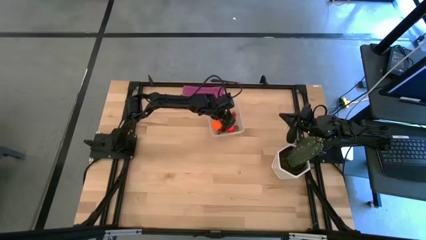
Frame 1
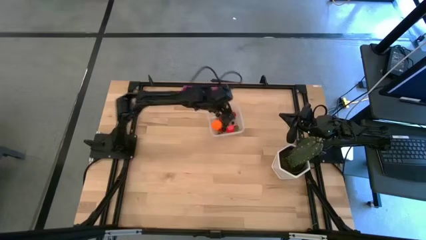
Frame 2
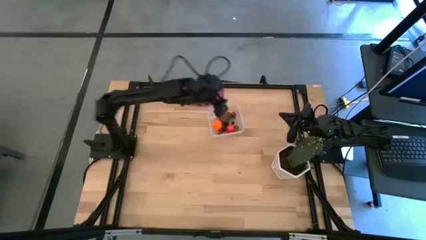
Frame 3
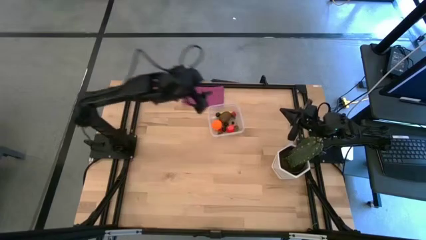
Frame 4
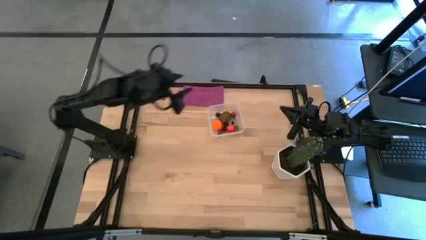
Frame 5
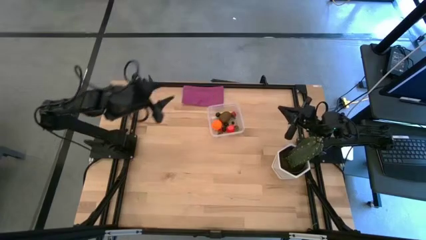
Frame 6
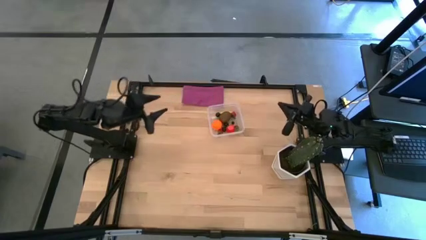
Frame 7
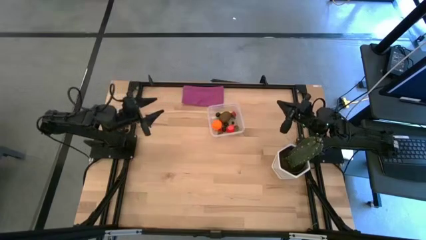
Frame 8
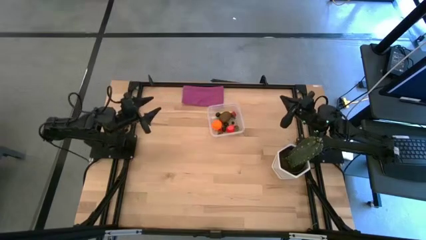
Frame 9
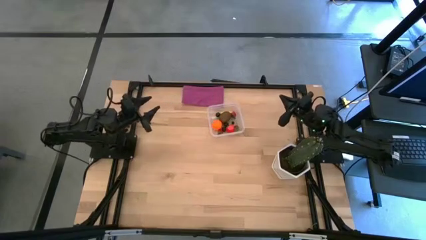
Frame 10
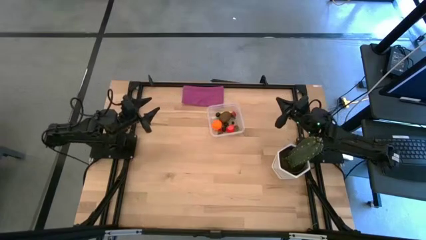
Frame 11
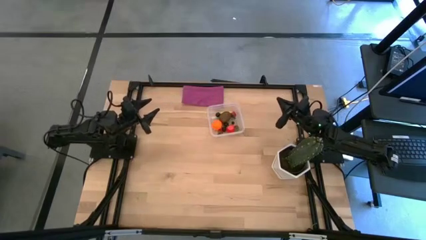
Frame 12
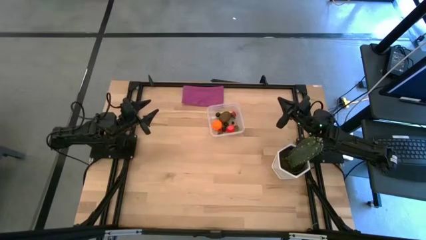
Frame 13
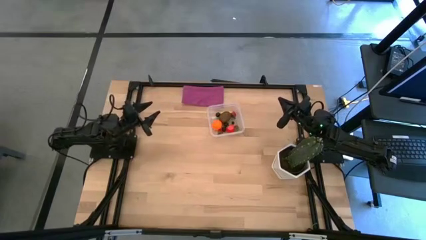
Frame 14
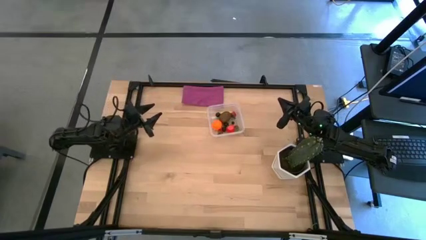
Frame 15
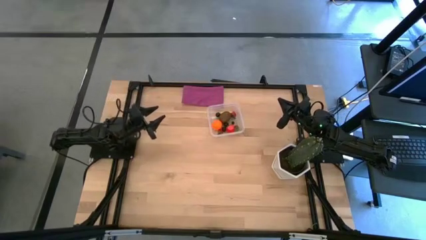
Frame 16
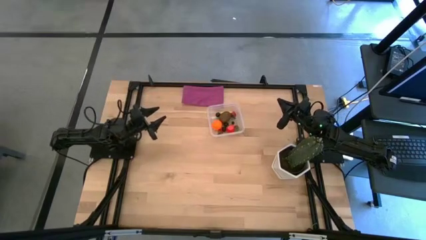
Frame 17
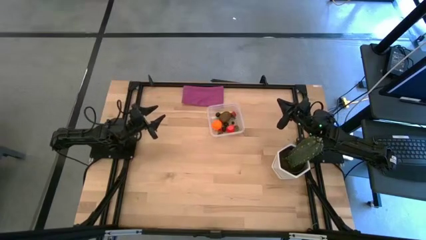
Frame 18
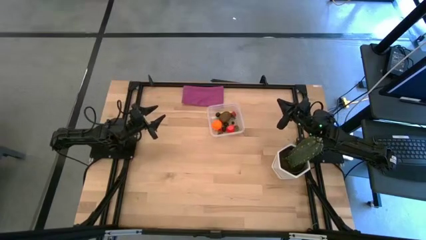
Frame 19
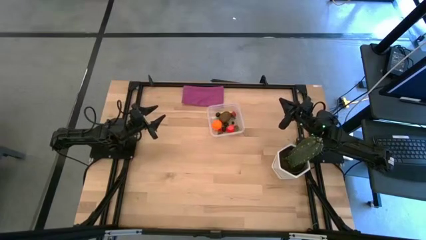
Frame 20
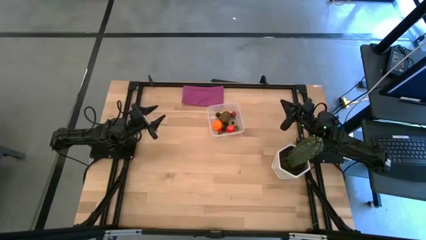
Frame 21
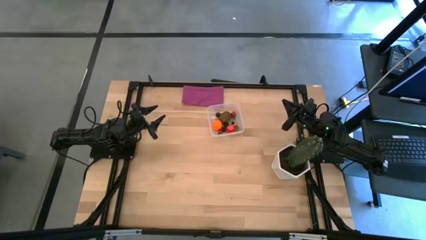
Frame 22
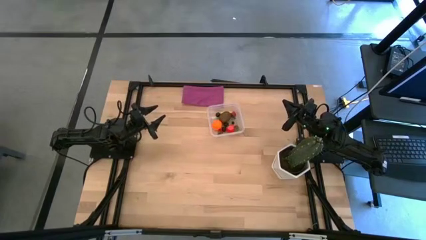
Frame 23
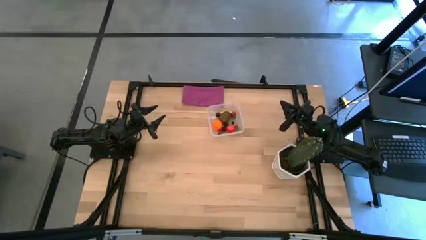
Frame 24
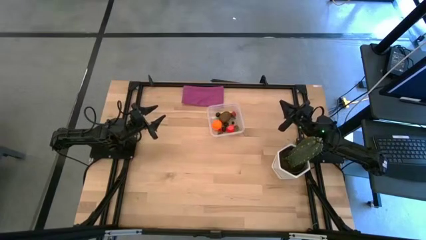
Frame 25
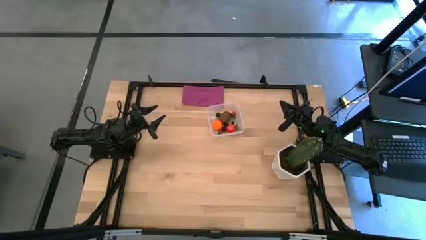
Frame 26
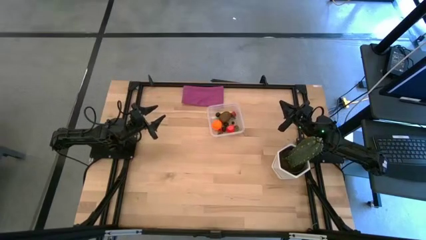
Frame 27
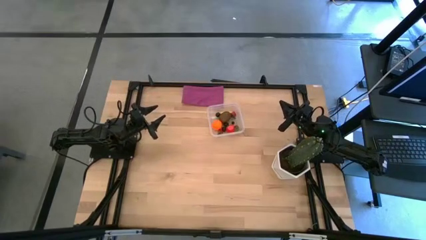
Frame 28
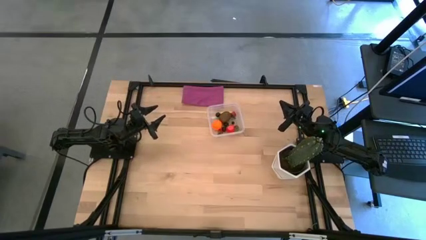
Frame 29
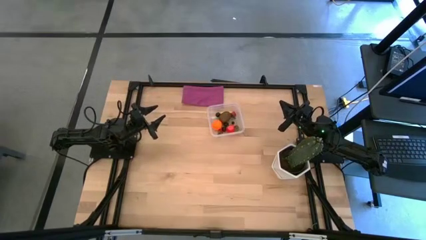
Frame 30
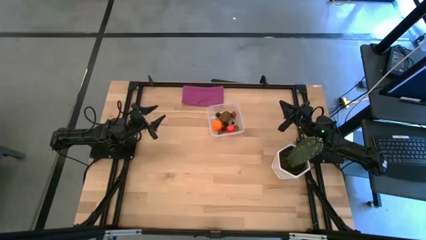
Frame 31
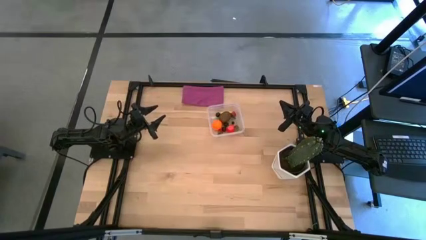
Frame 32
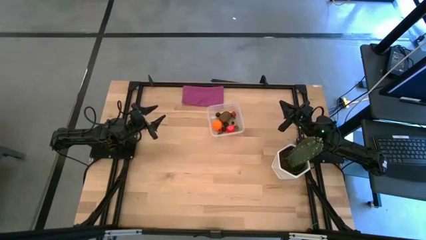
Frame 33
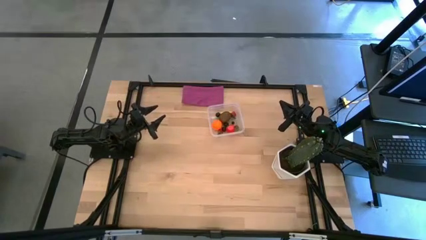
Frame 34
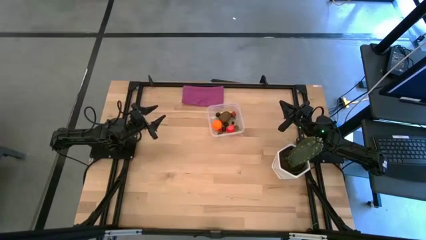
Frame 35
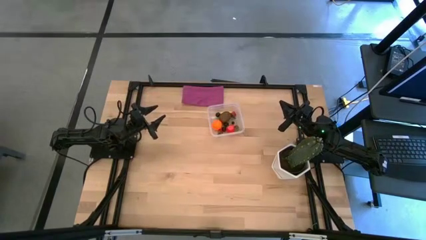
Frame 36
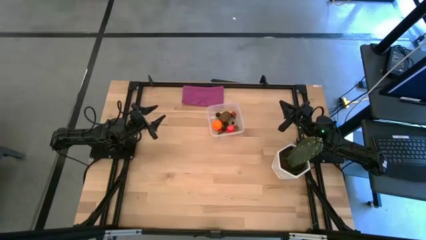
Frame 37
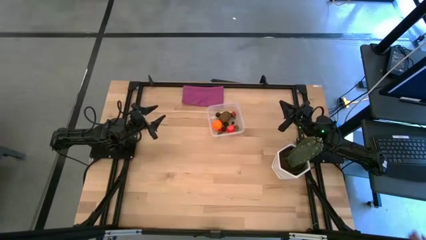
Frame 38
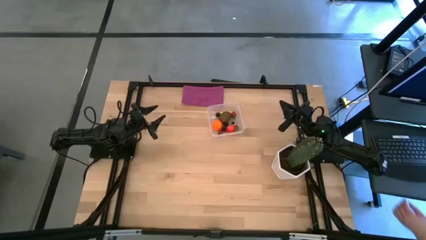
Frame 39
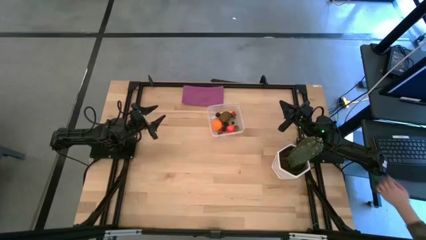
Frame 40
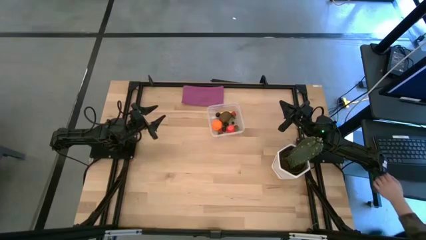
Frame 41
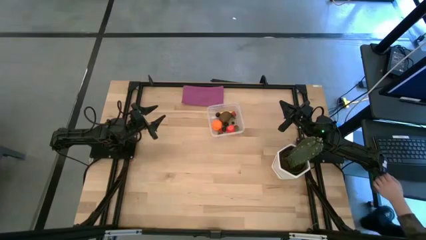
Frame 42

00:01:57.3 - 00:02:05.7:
Task: Pick and placing Produce into tupperware
Return to Home Position

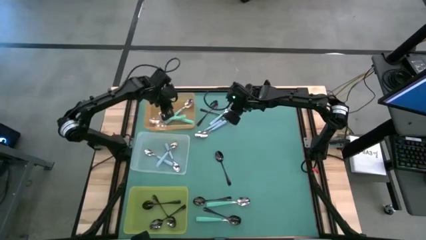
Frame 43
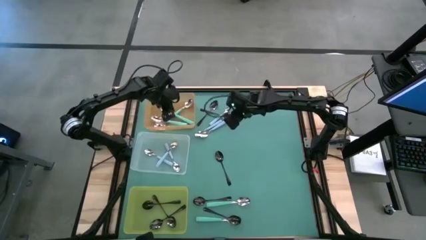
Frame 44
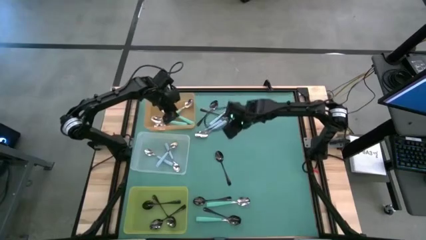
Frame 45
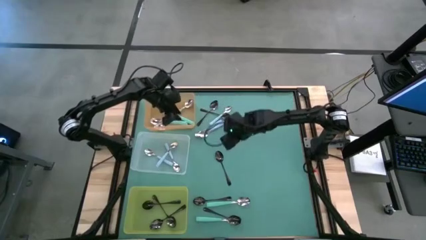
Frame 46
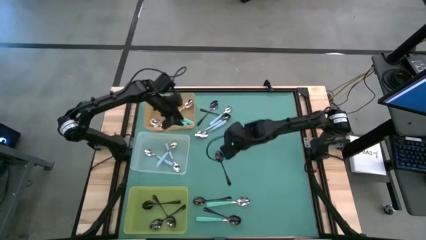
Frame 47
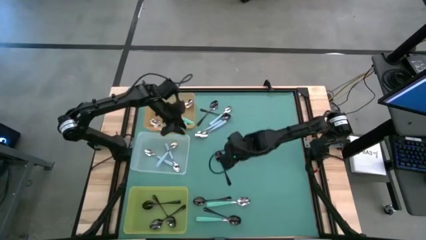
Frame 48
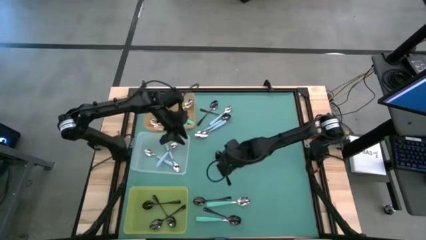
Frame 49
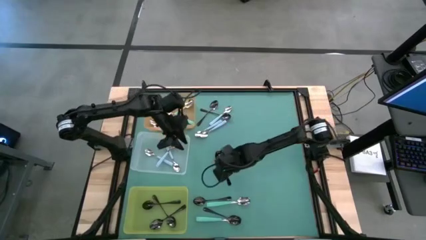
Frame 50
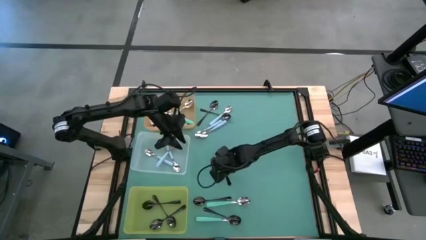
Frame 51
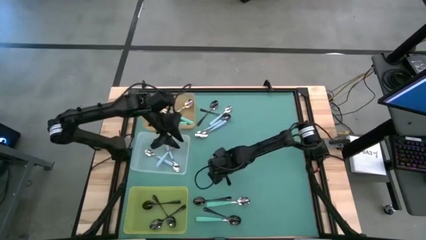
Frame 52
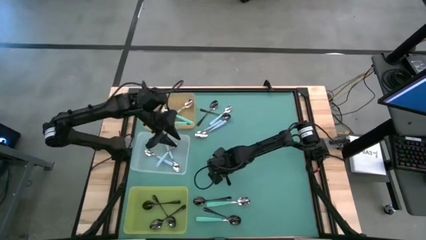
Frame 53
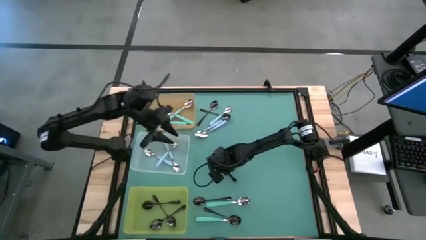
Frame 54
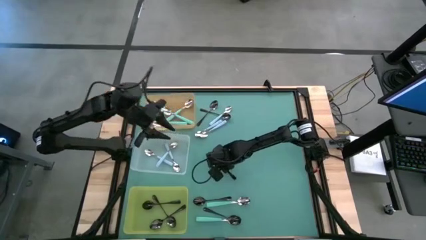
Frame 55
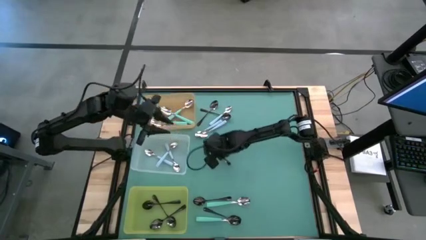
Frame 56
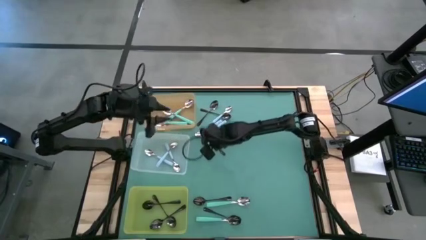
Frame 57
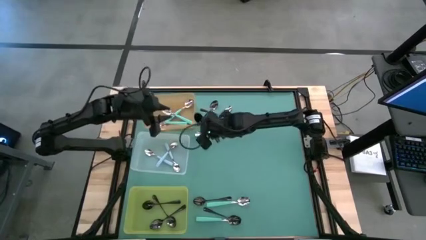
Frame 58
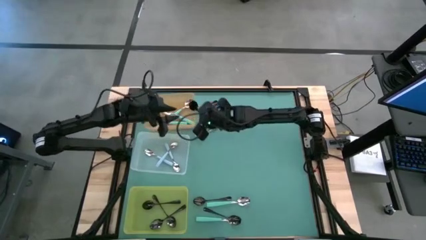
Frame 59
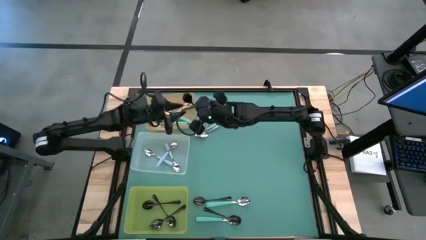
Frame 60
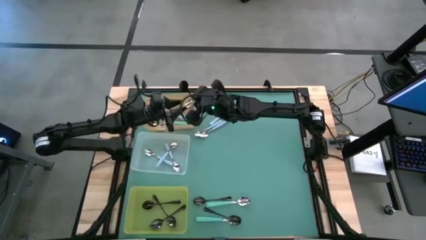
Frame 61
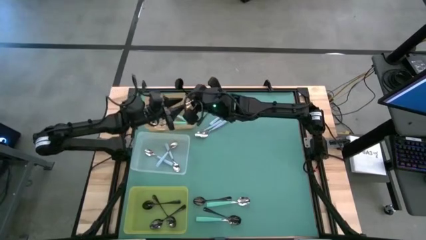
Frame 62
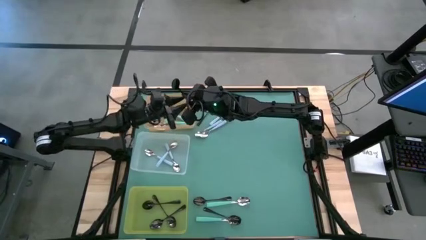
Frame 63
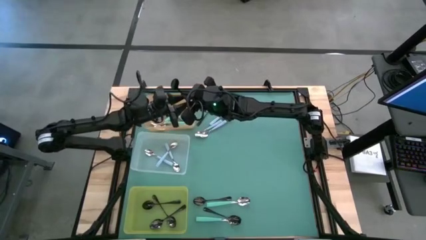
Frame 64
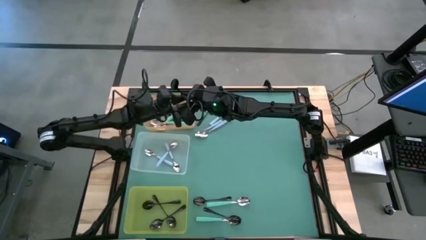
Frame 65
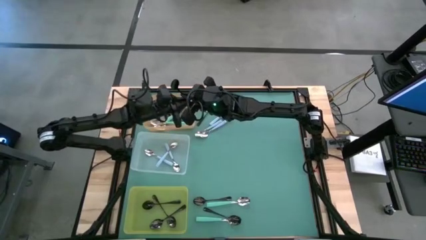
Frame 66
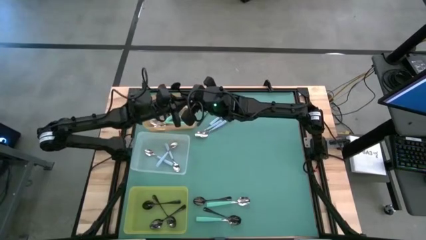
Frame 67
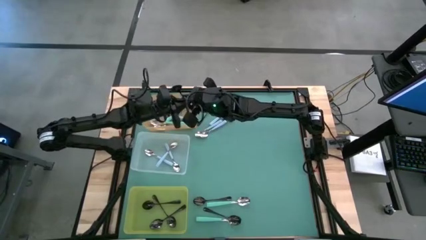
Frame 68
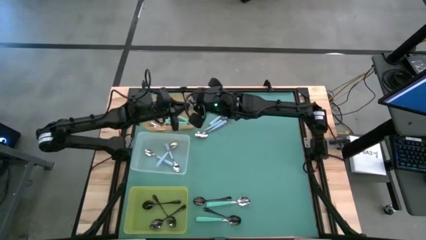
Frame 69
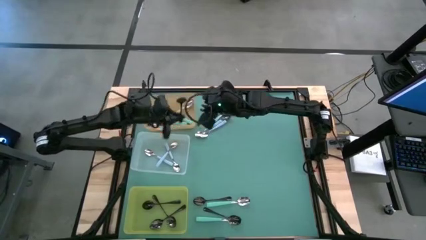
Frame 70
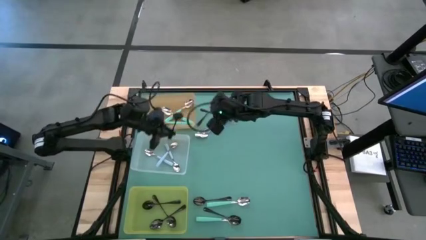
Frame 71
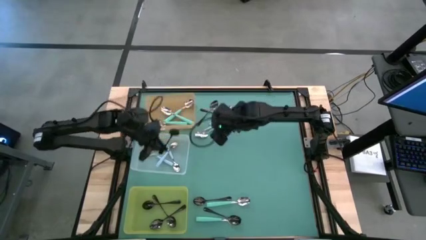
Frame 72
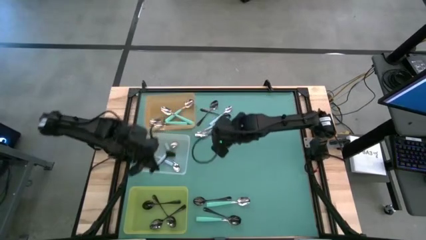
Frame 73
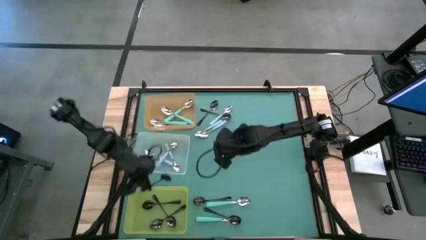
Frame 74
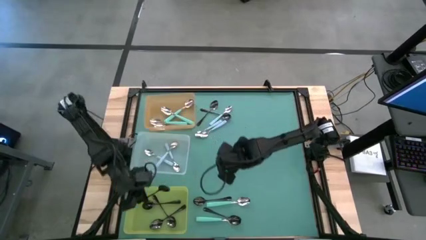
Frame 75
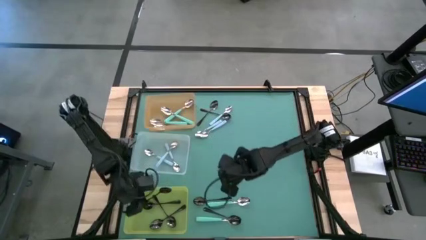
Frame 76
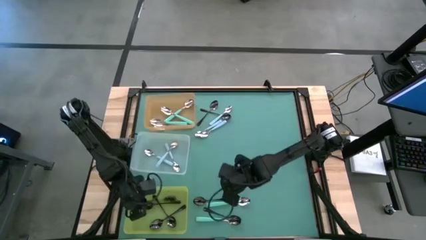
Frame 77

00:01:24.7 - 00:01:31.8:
Task: Sort silverware by color (type)
Put the black spoon into the yellow bin
